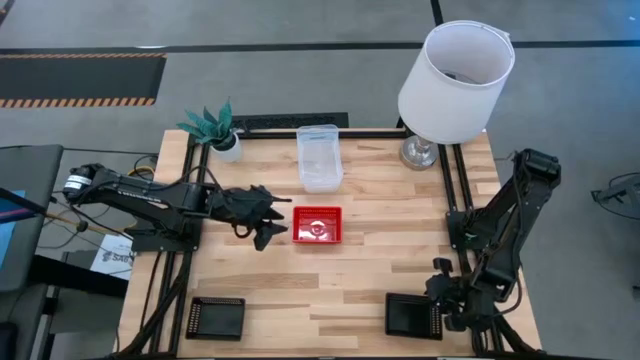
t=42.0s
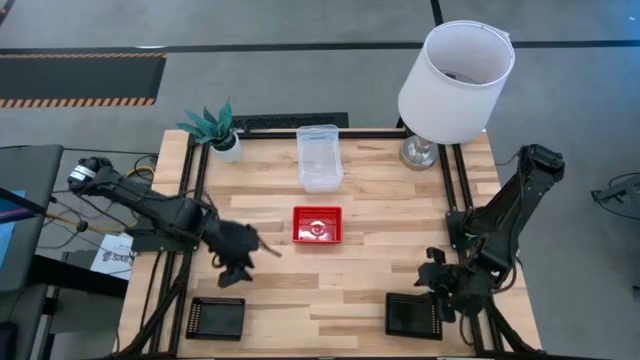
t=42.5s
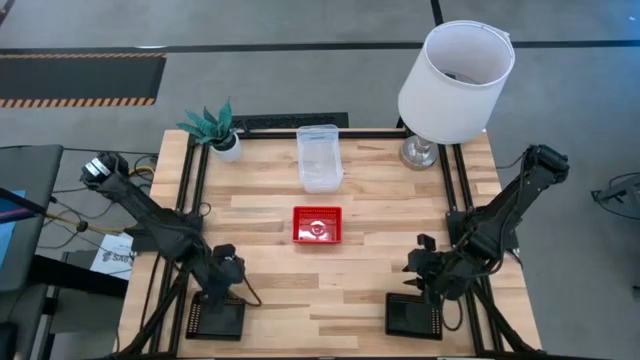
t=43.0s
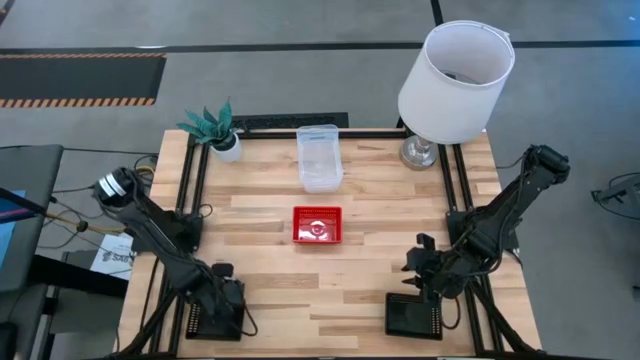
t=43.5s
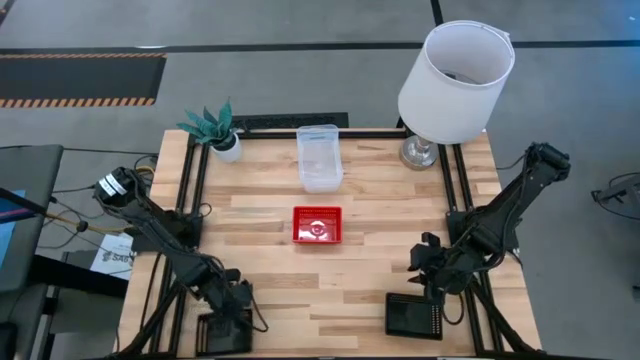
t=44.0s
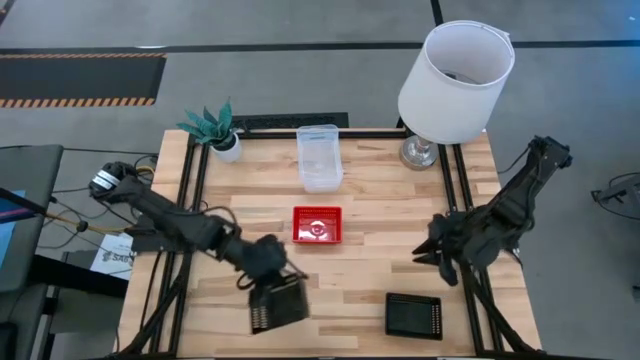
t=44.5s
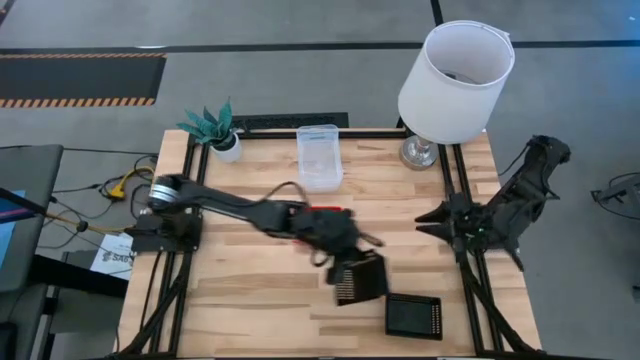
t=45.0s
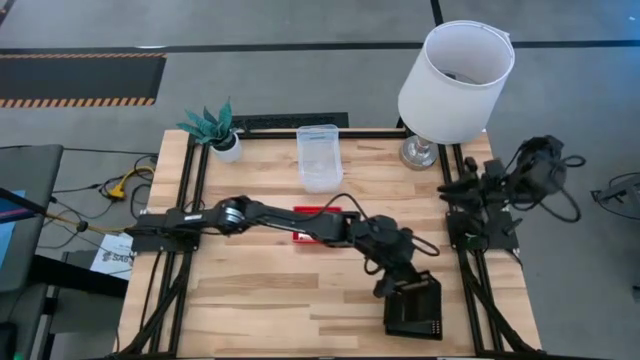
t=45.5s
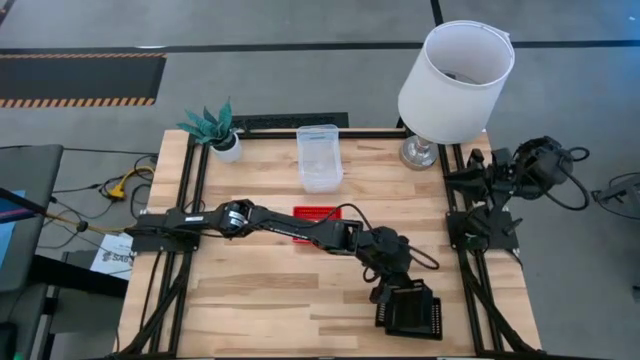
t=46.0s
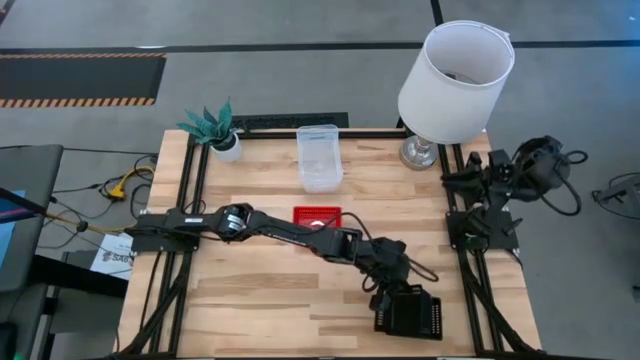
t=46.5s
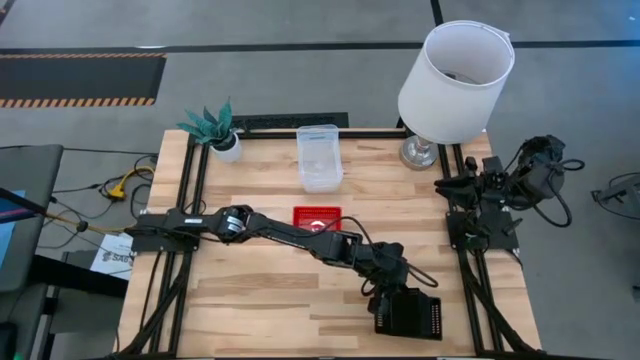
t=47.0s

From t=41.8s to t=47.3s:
Stack the left black bin on the right stacked black bins

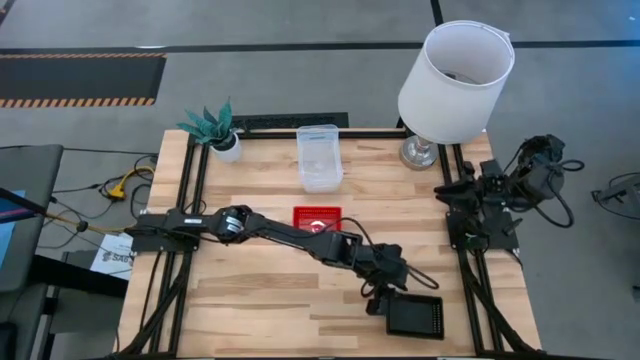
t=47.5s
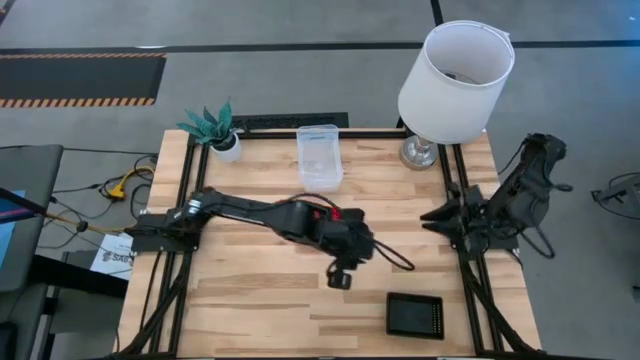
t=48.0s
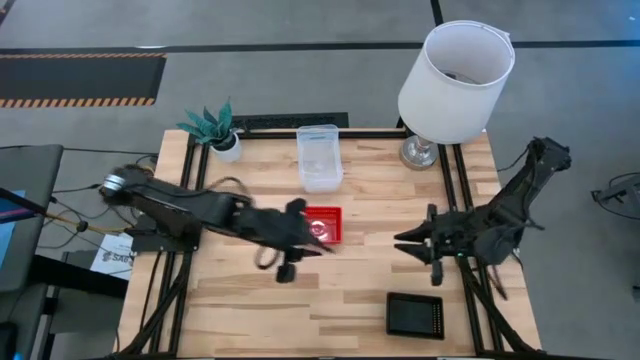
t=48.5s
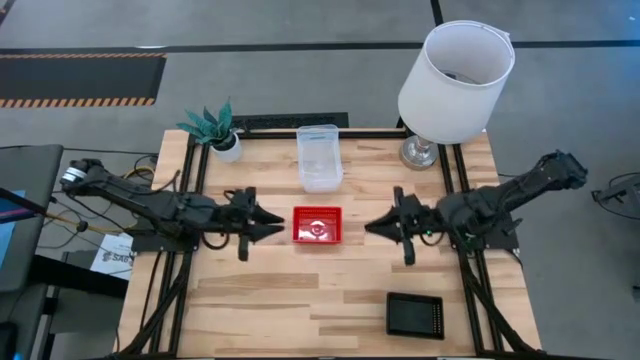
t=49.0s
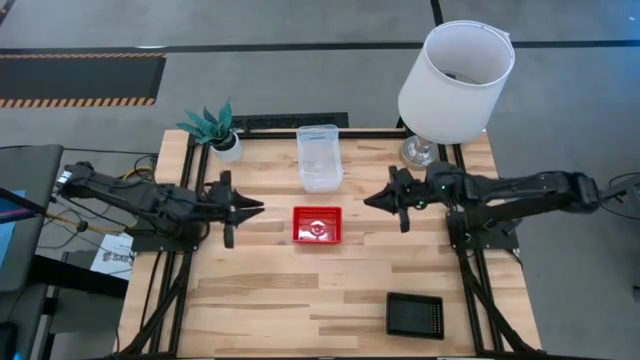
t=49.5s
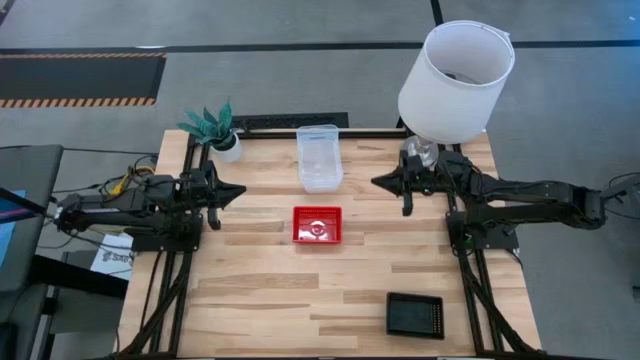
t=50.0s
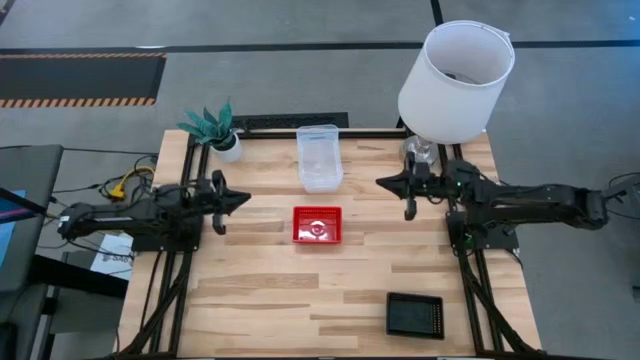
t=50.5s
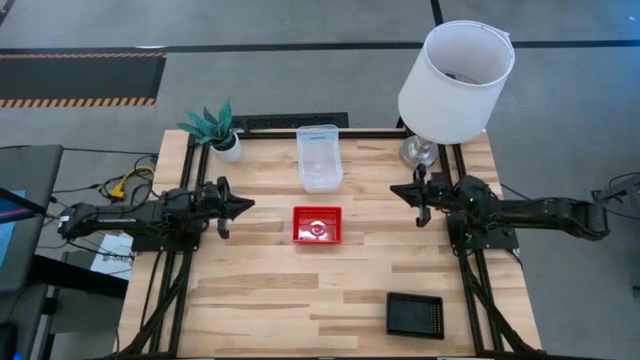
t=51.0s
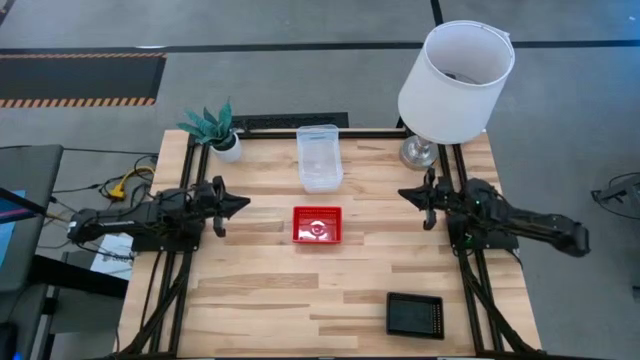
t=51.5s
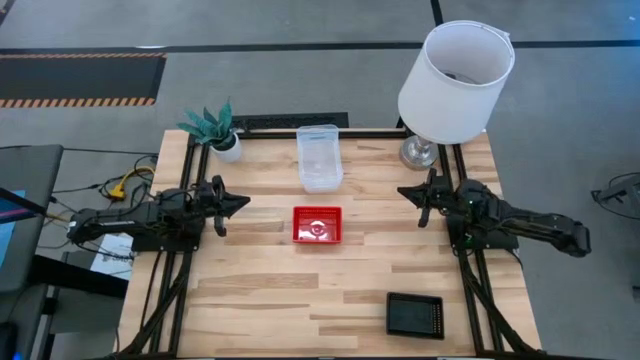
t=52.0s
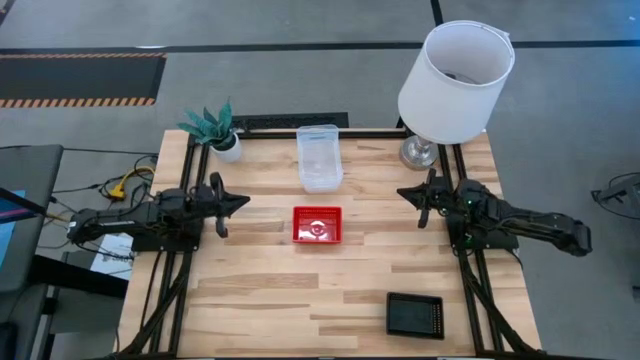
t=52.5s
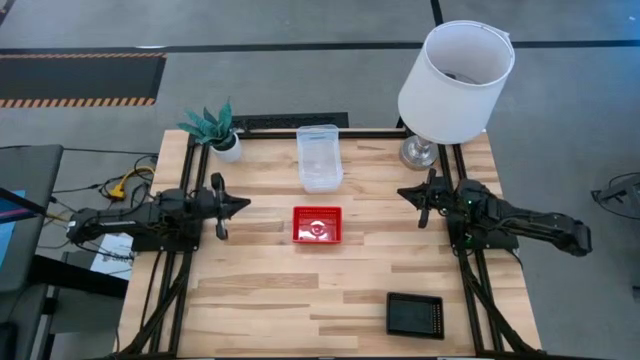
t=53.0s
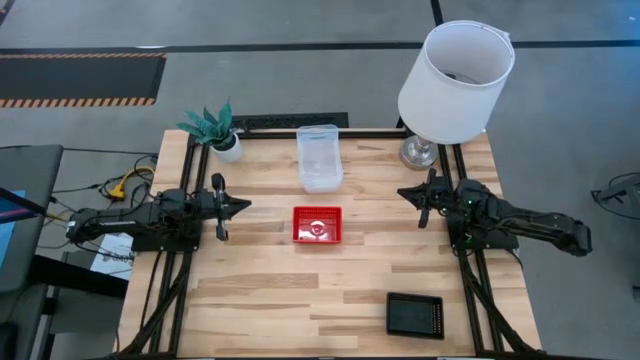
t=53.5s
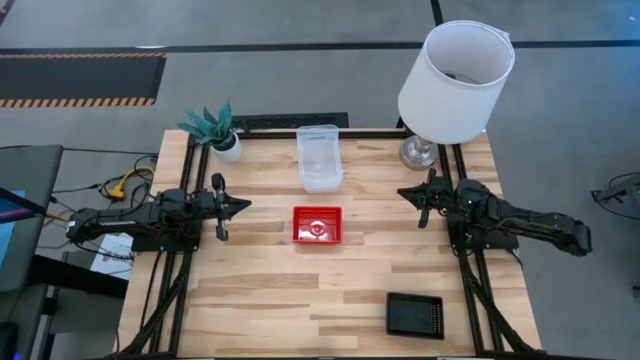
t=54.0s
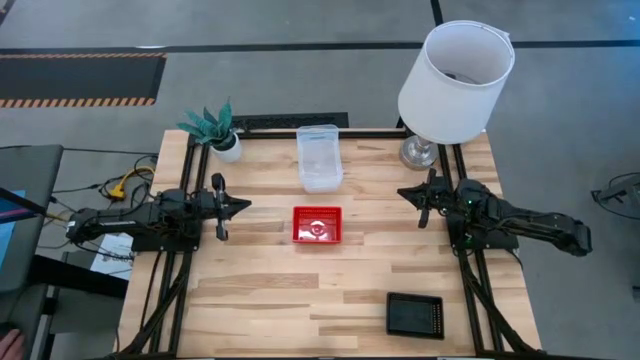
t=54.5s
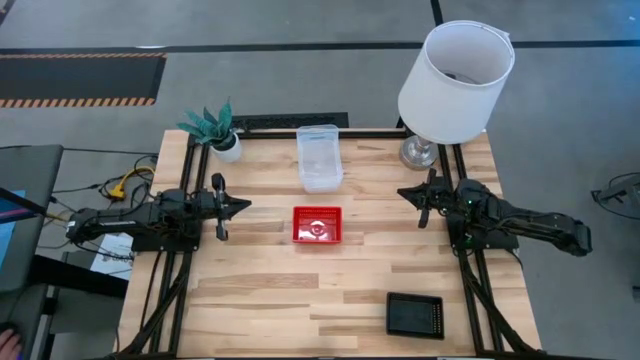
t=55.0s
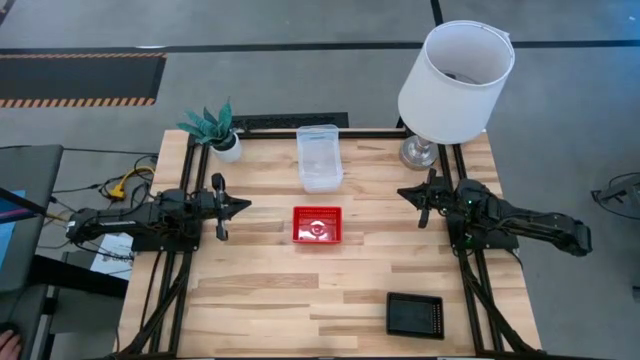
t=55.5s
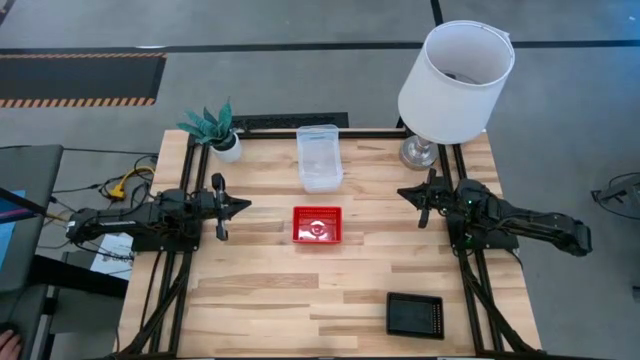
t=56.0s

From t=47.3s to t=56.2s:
Return to Home Position

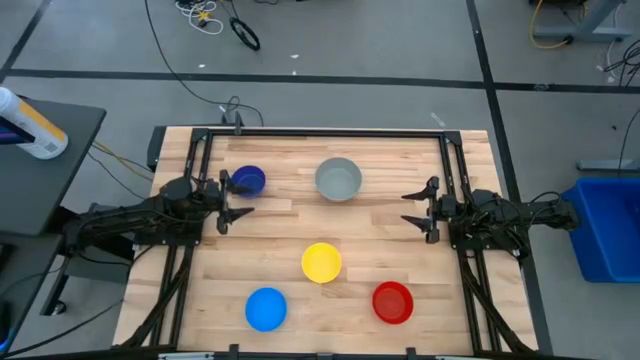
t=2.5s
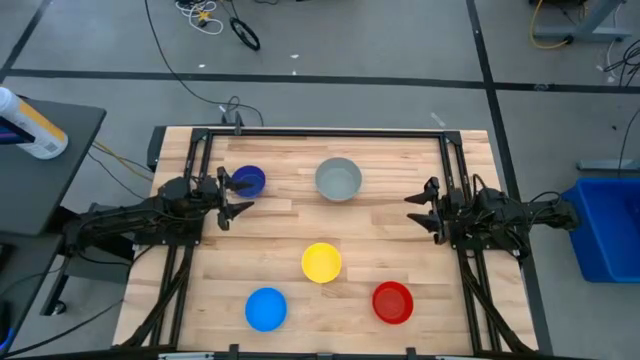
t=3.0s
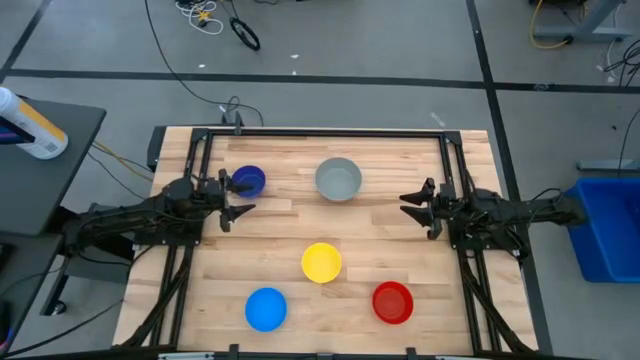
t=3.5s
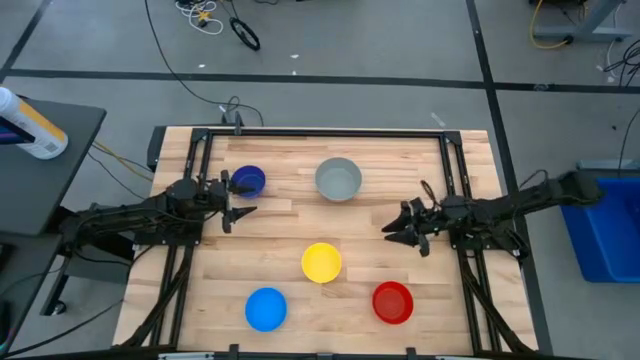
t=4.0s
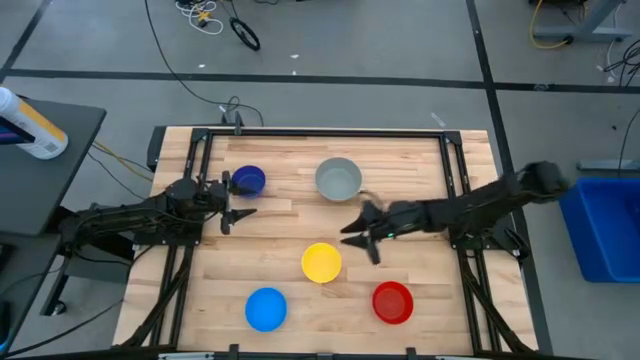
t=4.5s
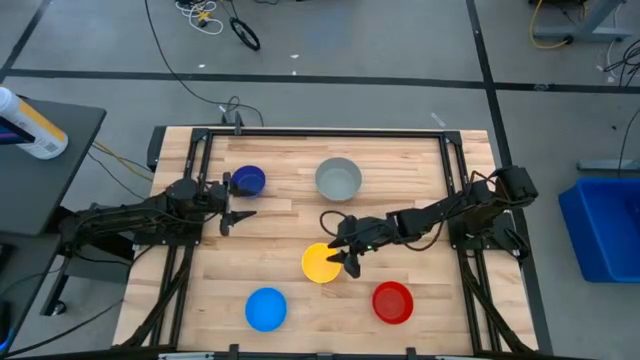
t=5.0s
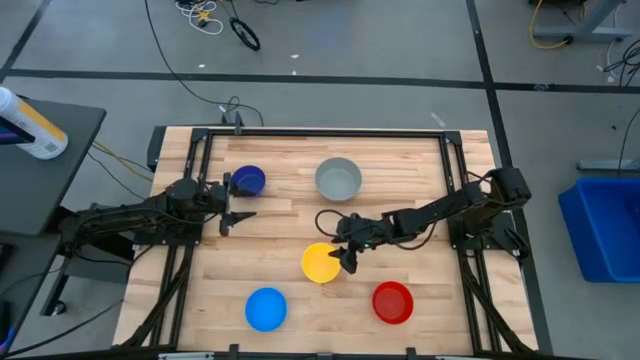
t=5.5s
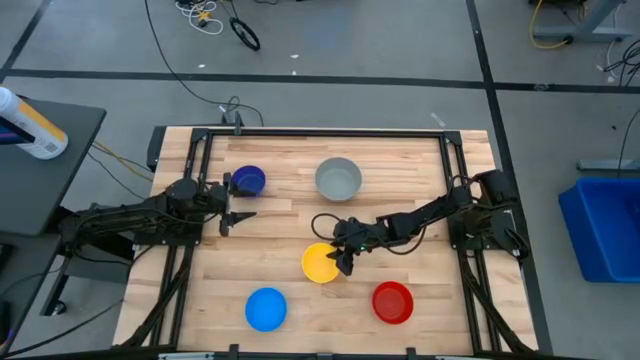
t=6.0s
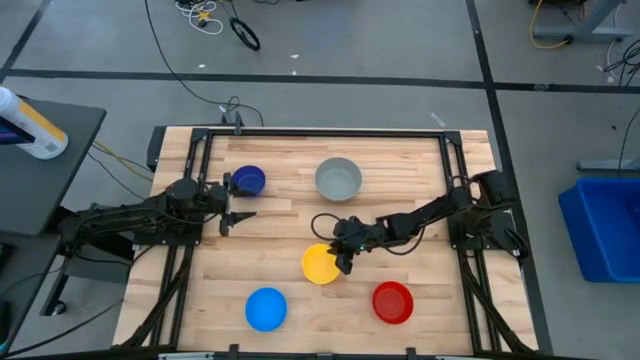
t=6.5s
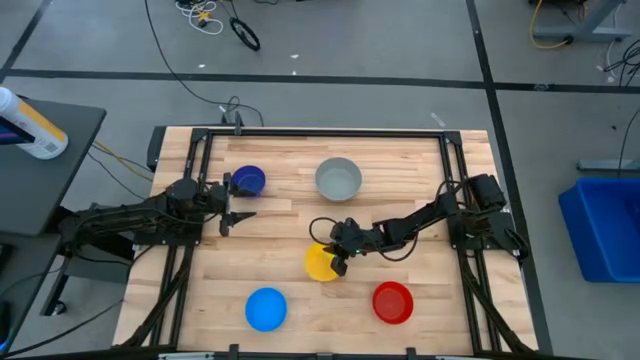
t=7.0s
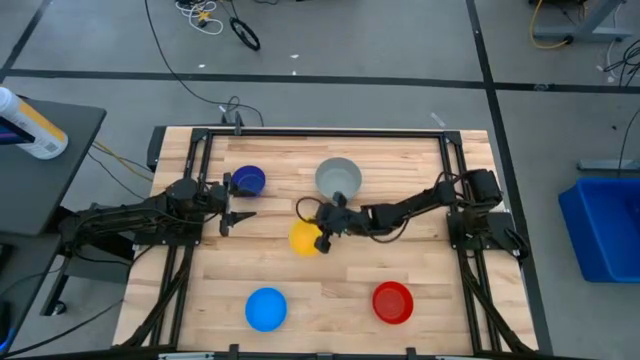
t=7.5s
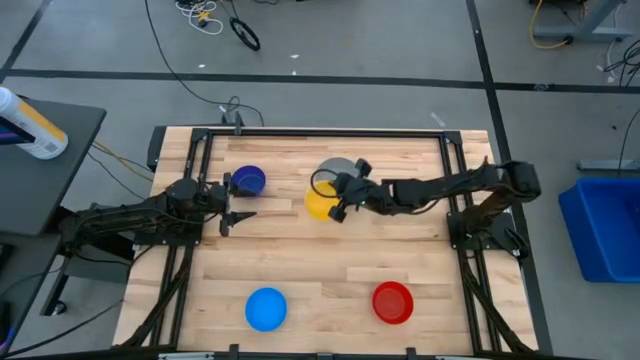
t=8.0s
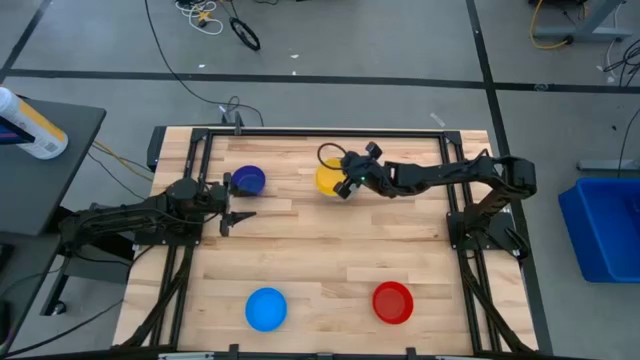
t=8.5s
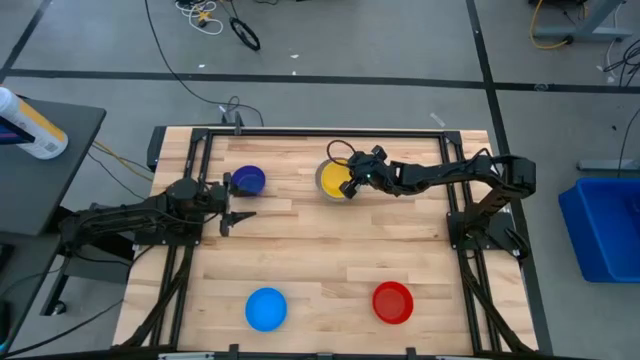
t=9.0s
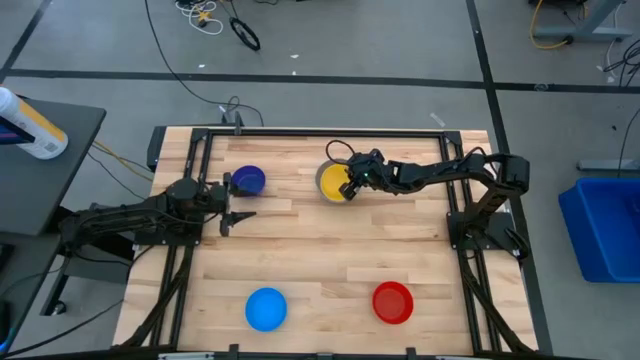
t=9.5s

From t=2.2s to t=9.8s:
Stack the yellow bowl on top of the gray bowl
